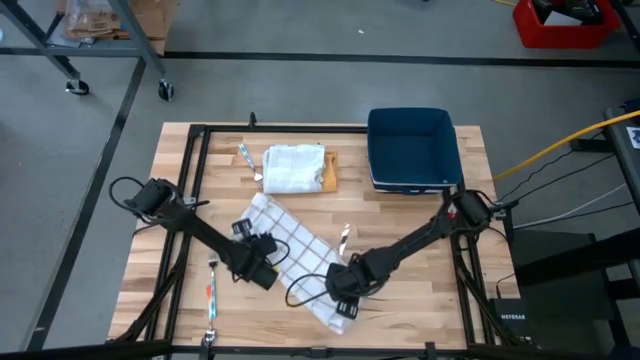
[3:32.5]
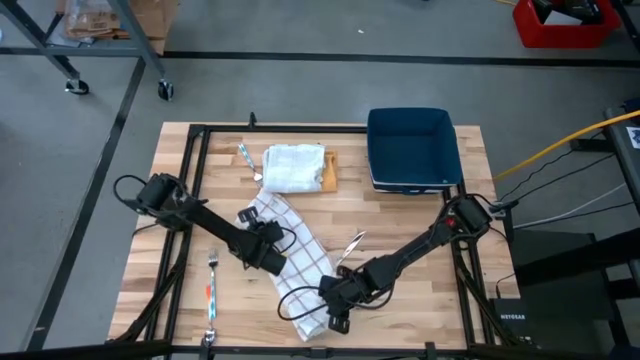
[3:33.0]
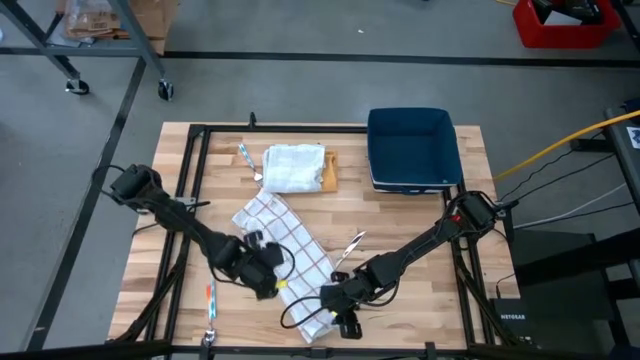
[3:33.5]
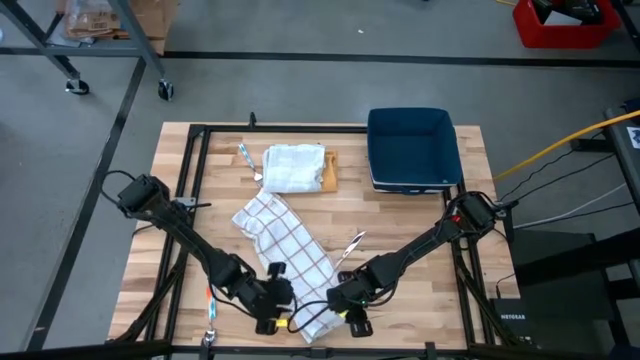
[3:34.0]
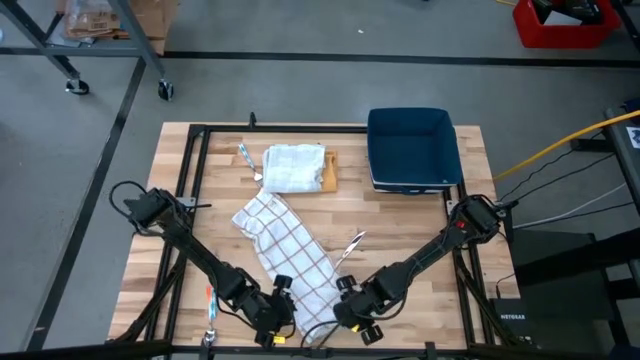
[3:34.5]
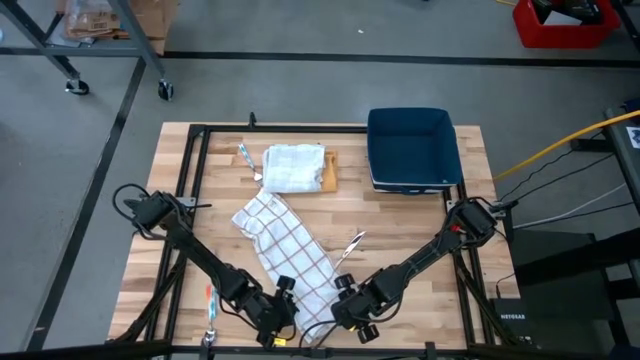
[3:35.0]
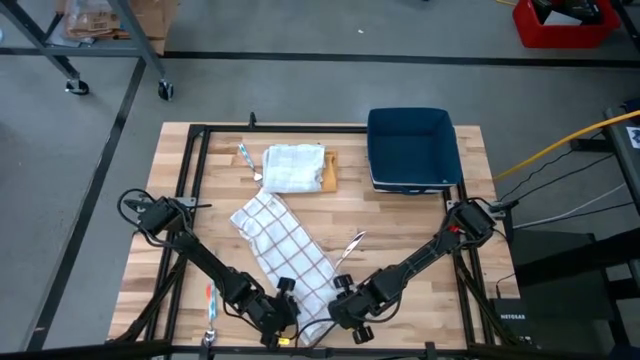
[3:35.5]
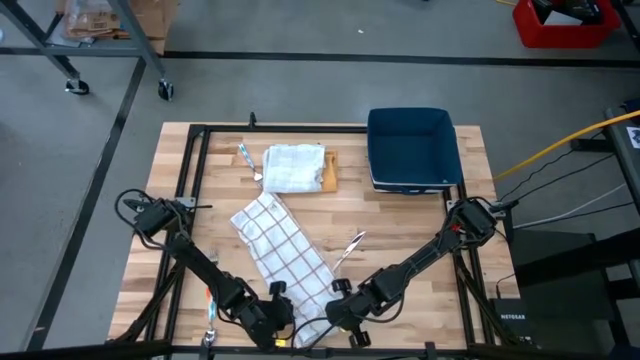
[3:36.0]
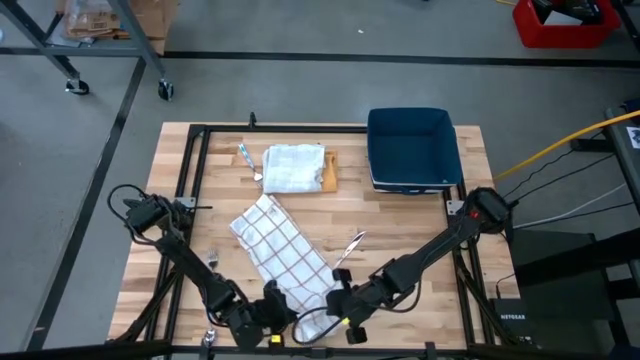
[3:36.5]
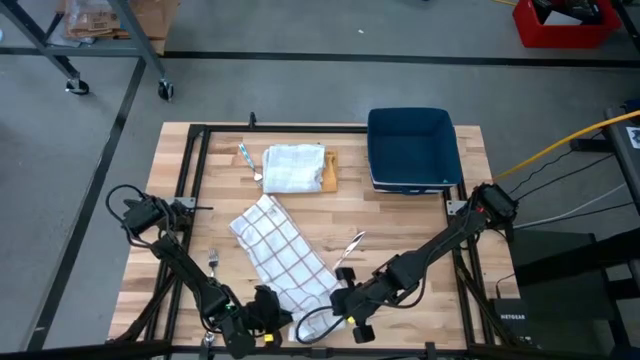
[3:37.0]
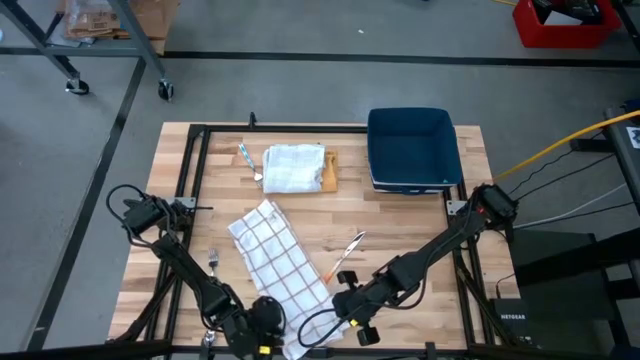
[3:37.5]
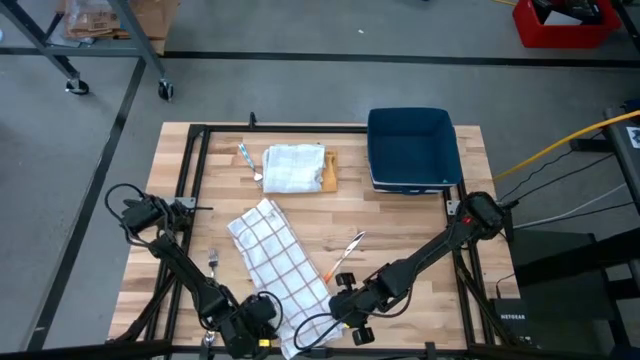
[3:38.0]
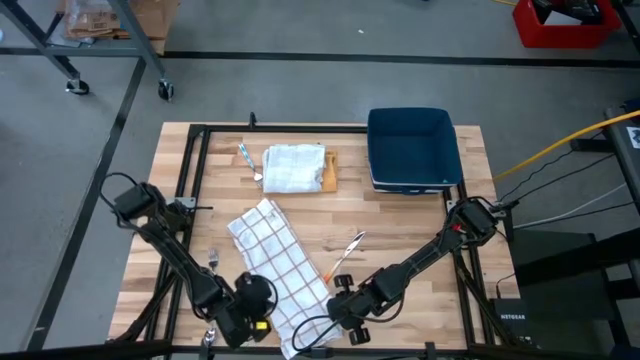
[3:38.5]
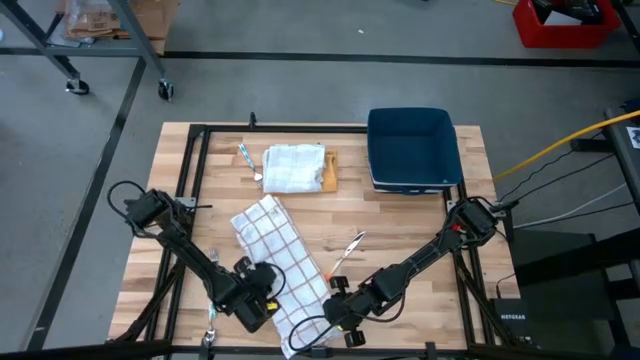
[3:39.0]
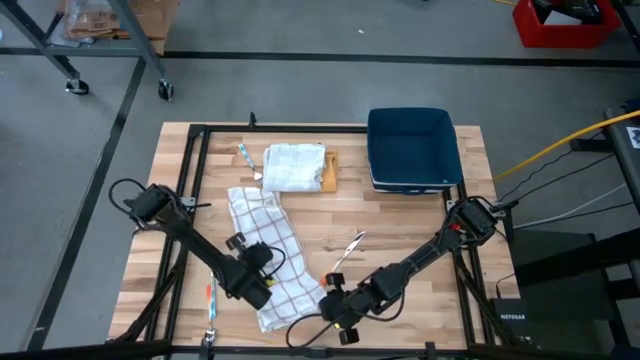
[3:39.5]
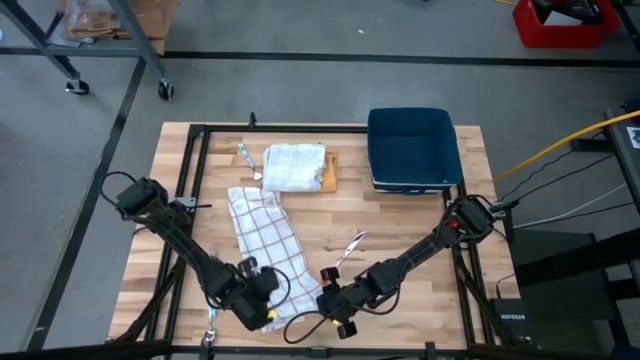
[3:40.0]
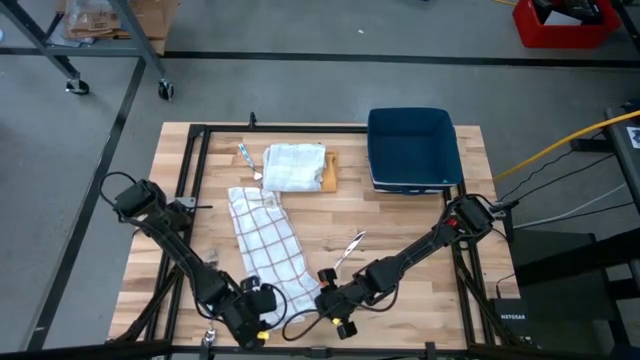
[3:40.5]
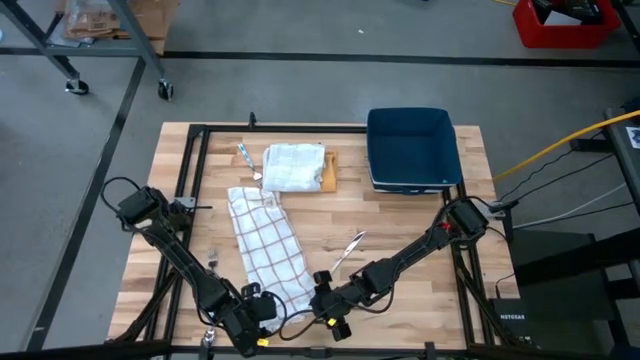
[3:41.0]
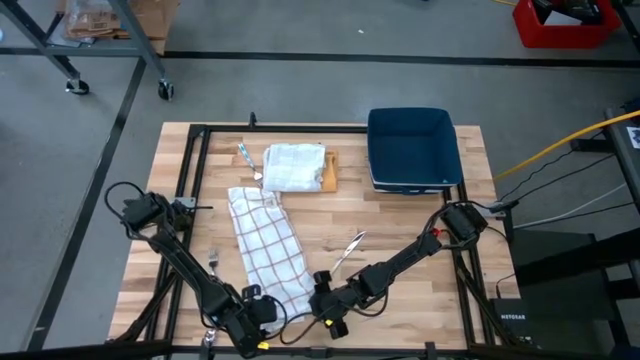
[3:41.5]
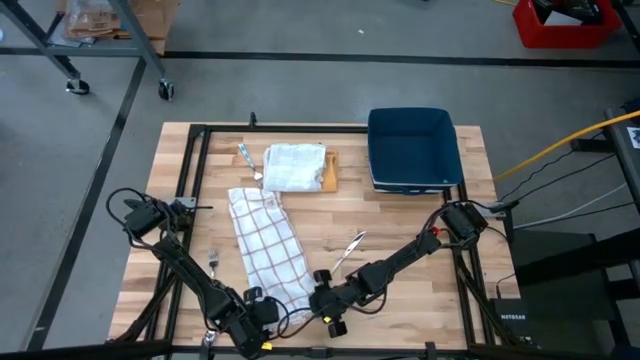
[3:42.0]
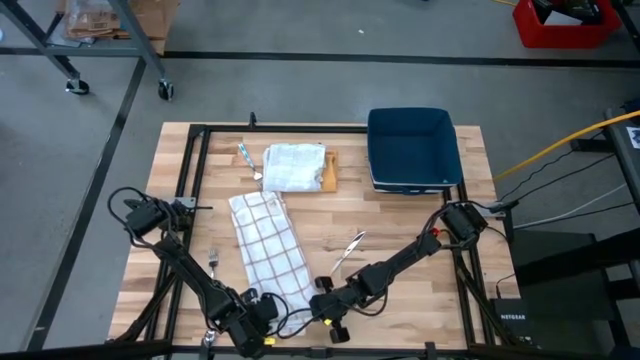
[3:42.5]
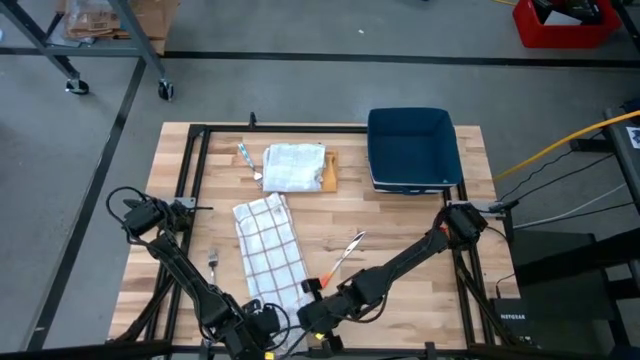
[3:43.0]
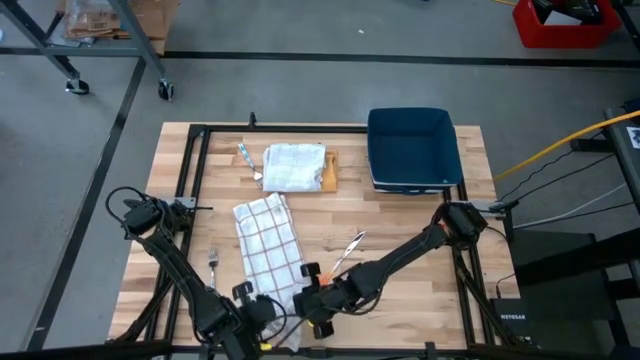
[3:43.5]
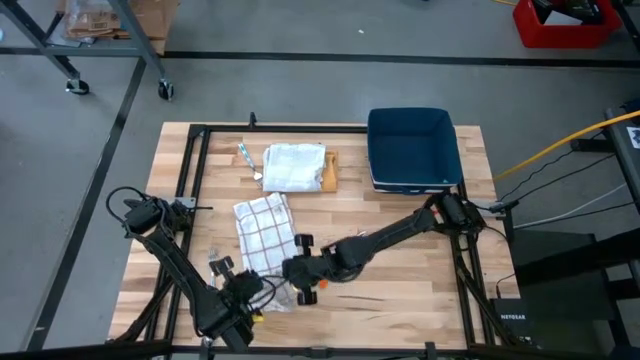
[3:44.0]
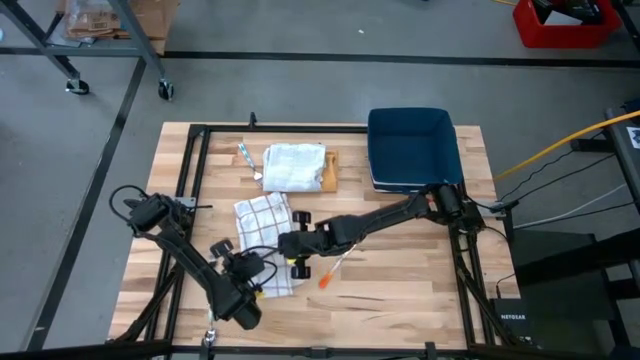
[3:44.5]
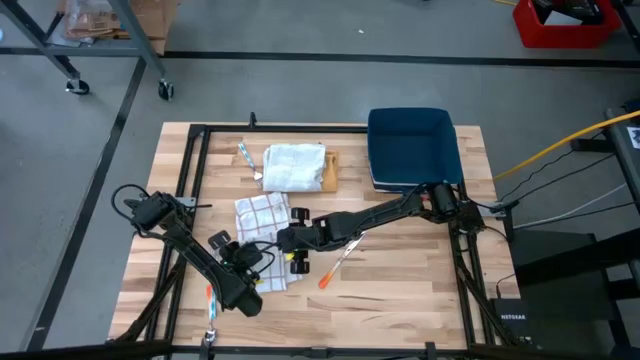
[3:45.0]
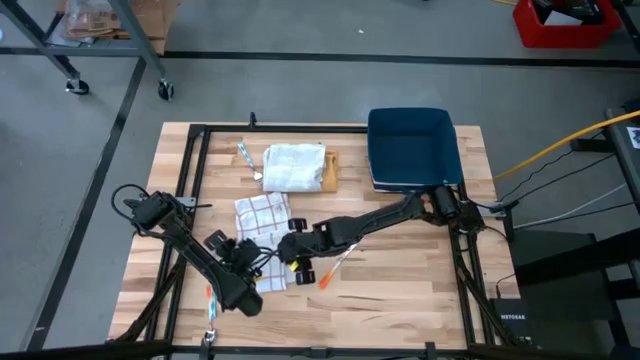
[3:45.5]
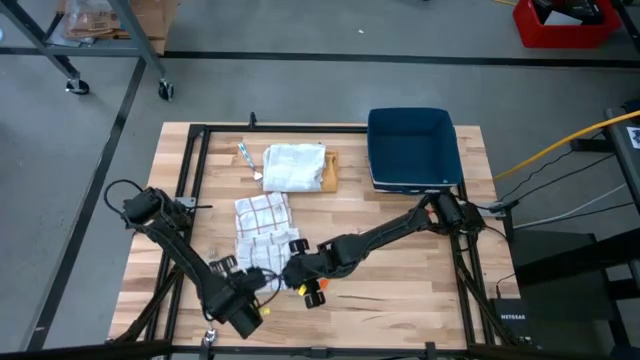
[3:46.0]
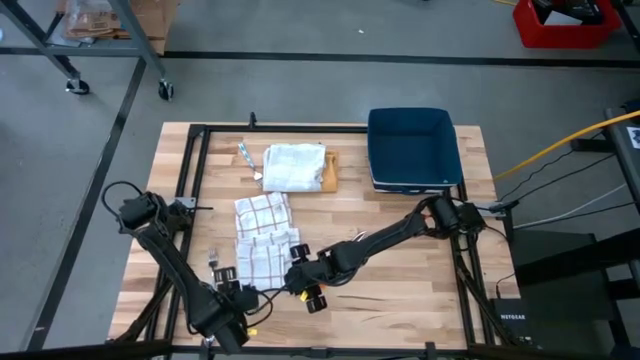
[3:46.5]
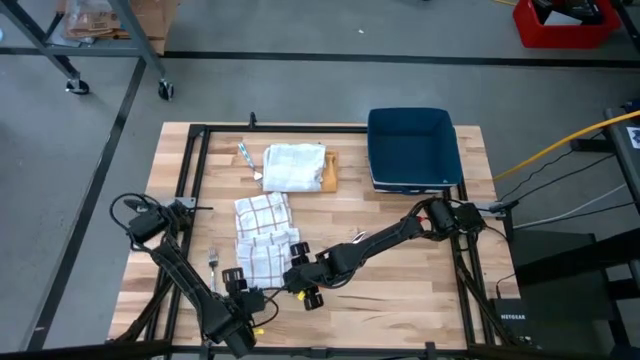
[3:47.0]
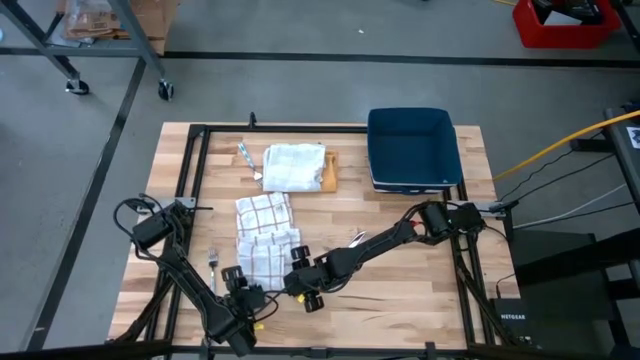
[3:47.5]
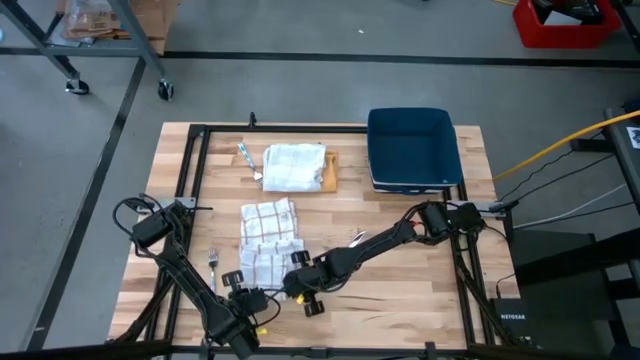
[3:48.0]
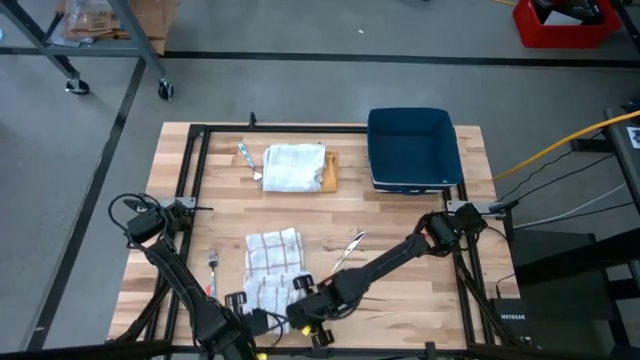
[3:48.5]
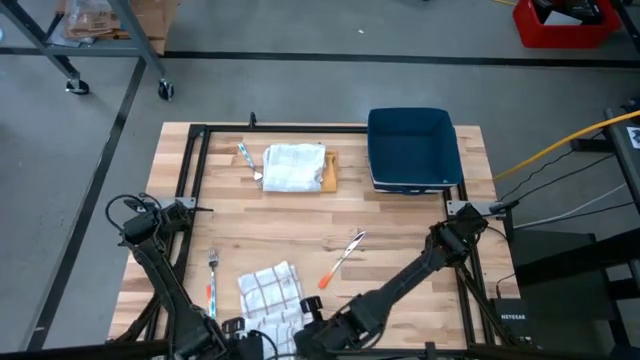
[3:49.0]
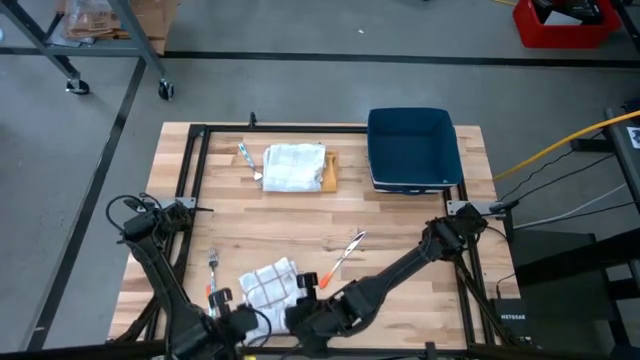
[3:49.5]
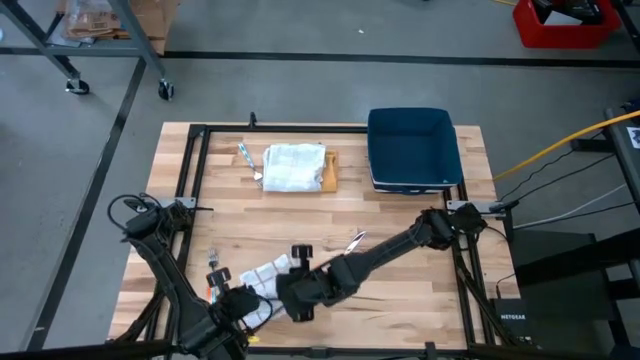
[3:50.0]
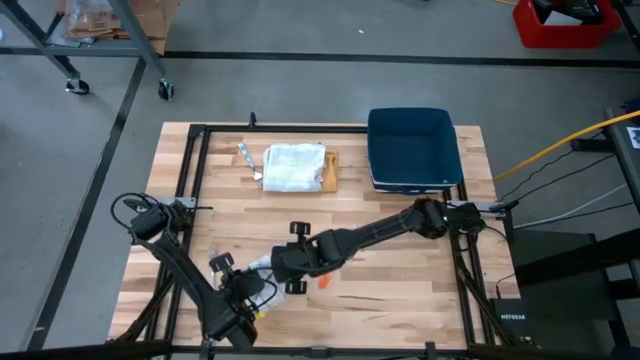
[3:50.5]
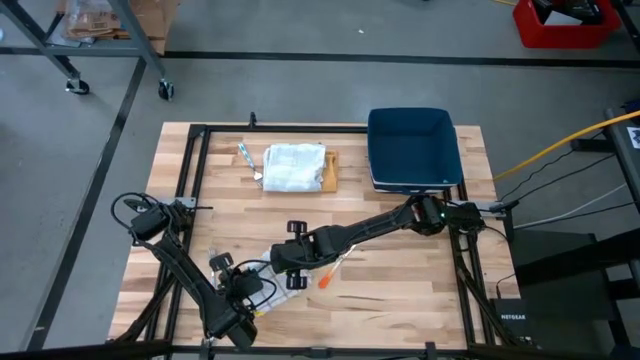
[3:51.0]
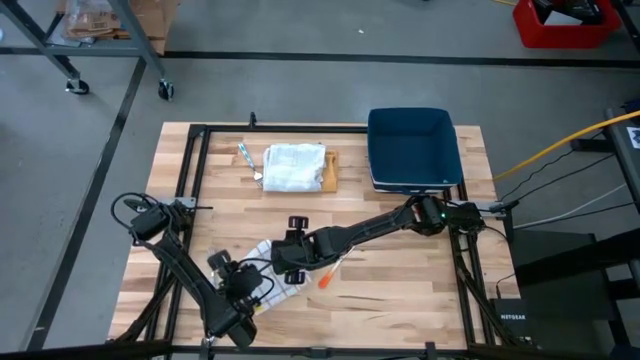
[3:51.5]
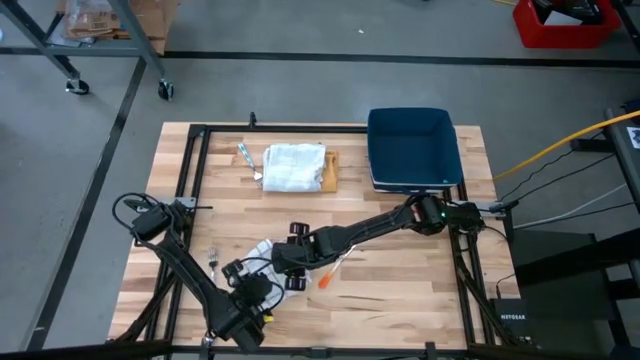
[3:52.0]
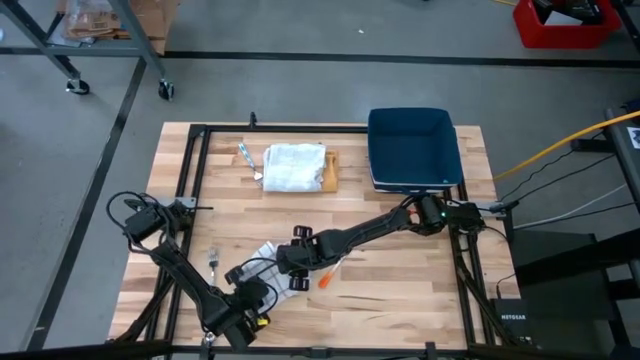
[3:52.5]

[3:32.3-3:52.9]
Task: Fold towel
Fold the white patterned towel
